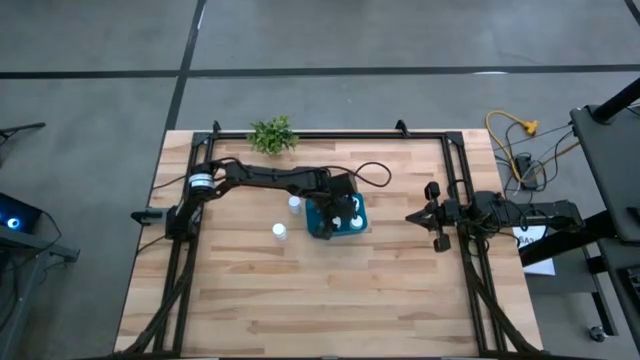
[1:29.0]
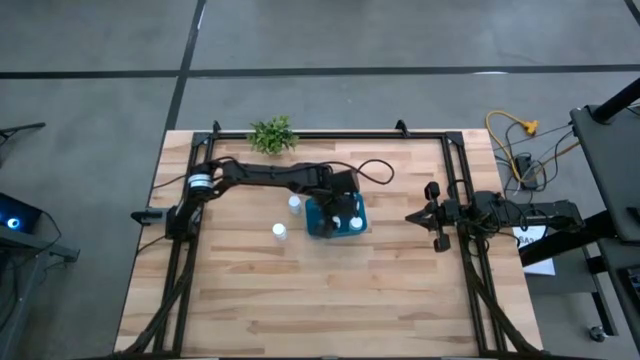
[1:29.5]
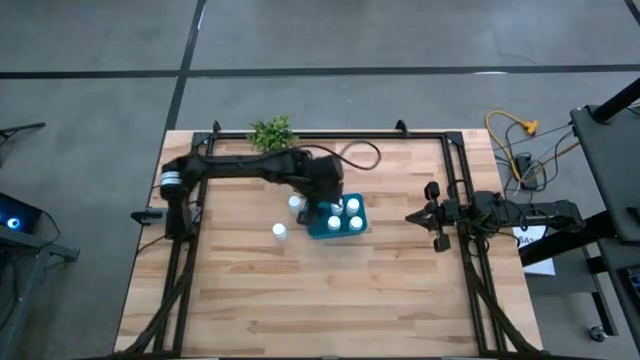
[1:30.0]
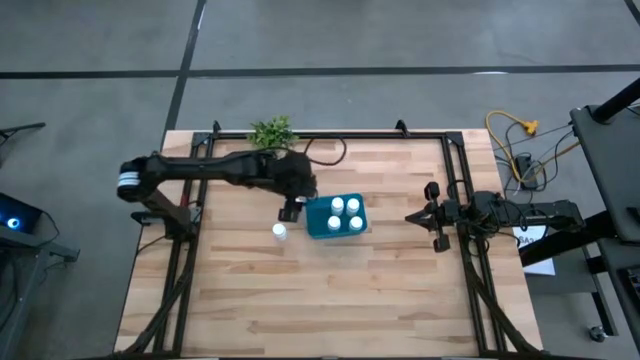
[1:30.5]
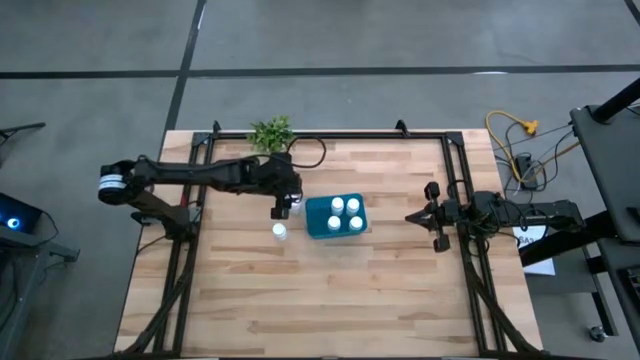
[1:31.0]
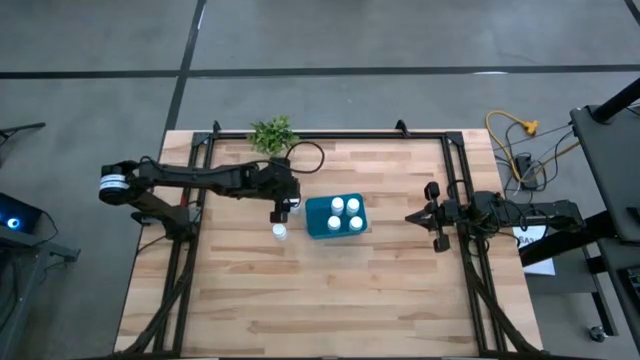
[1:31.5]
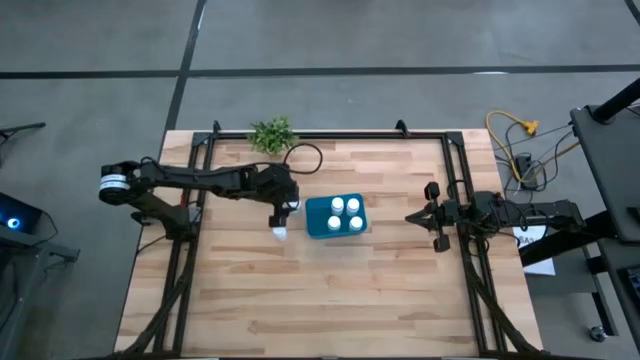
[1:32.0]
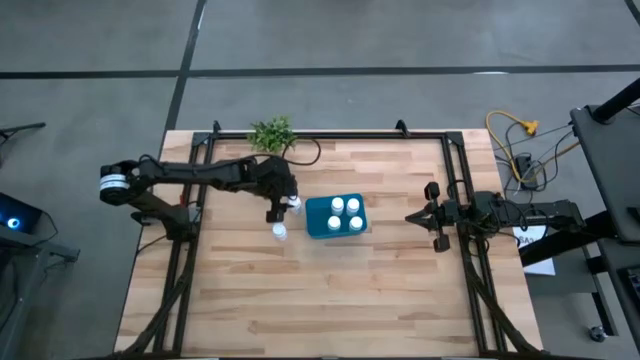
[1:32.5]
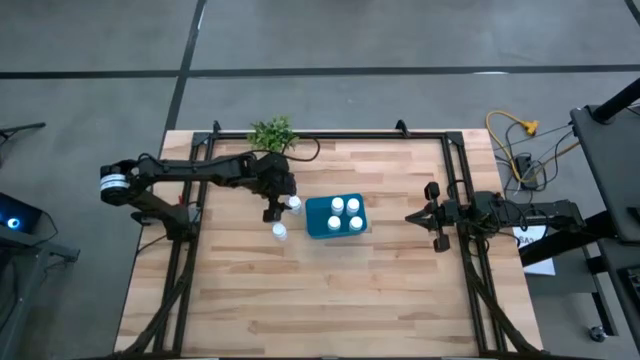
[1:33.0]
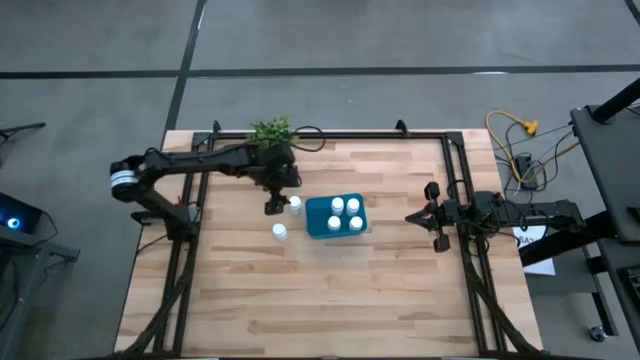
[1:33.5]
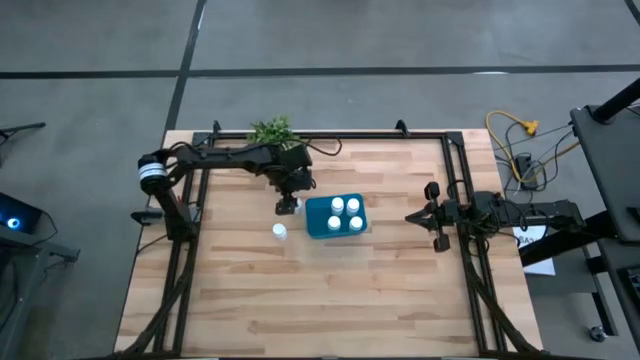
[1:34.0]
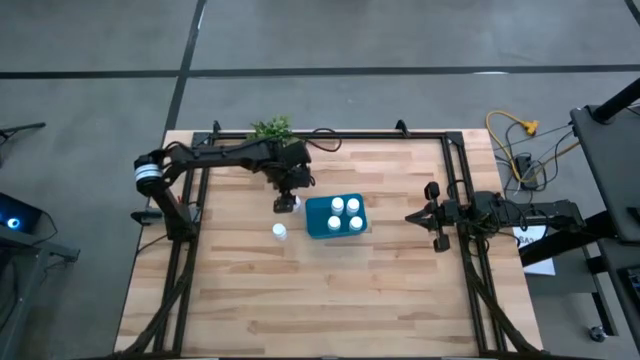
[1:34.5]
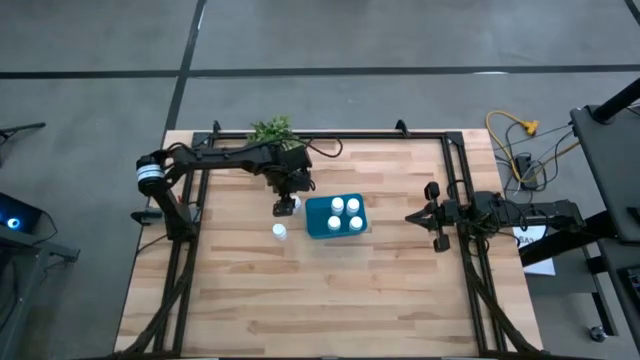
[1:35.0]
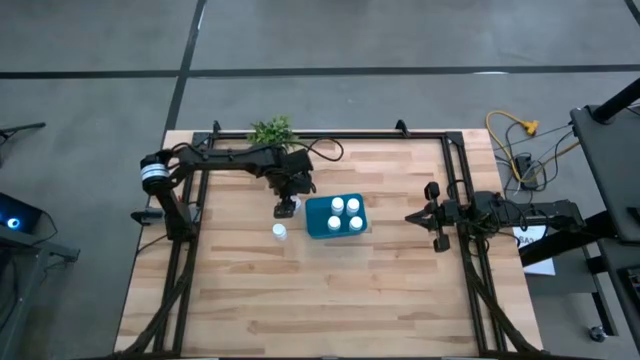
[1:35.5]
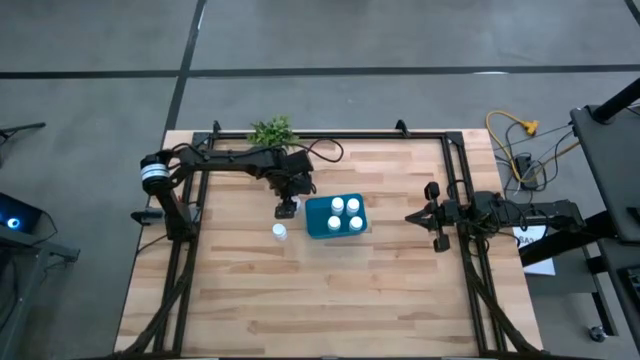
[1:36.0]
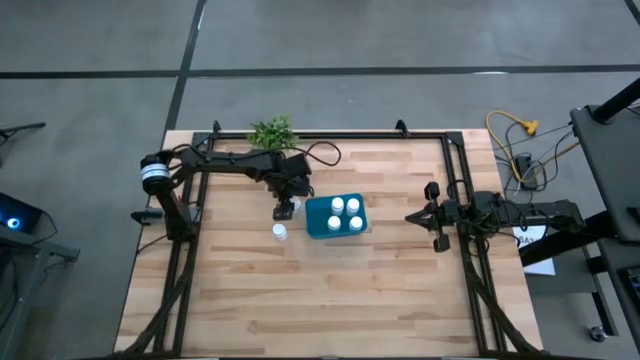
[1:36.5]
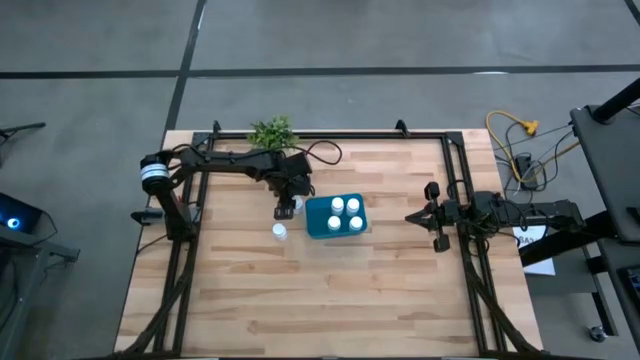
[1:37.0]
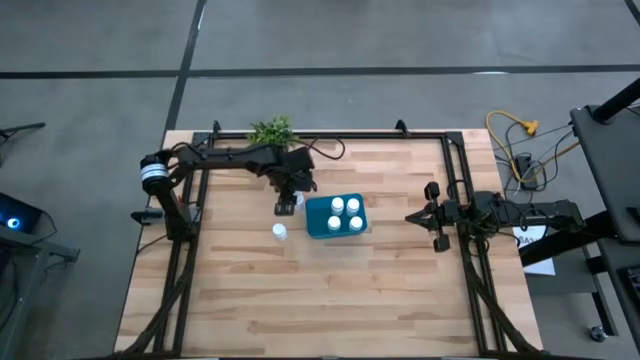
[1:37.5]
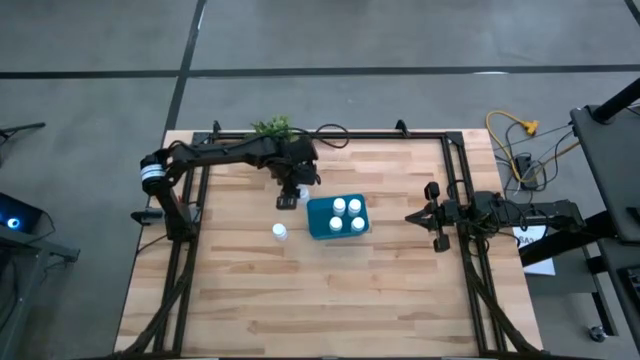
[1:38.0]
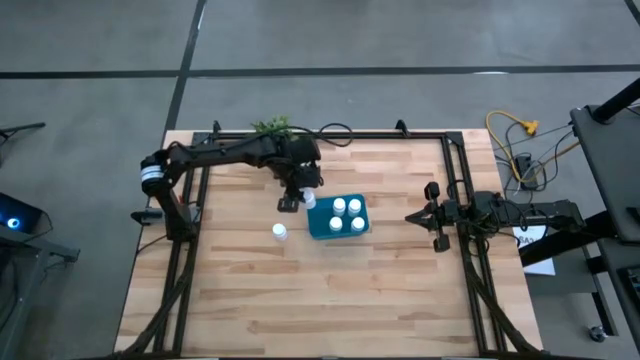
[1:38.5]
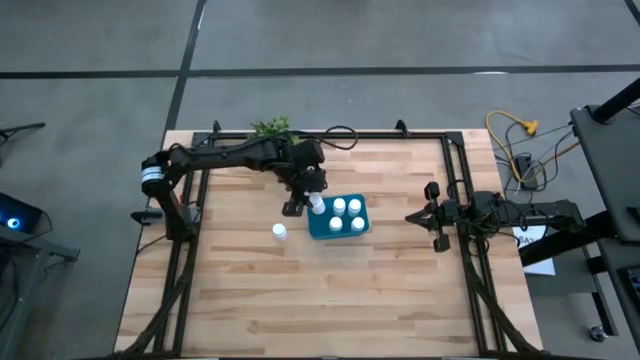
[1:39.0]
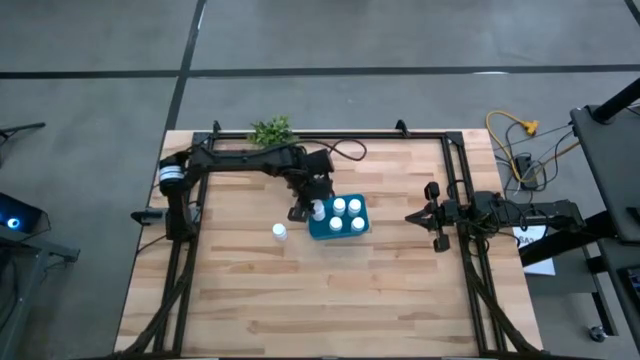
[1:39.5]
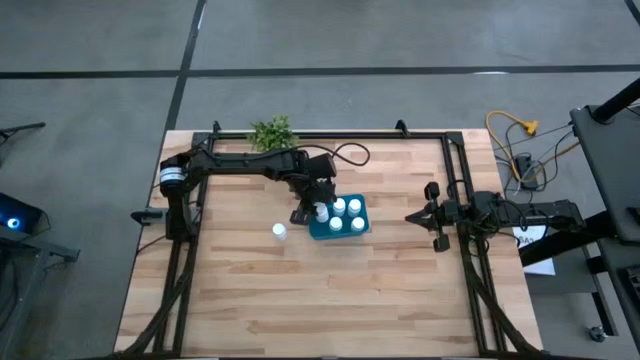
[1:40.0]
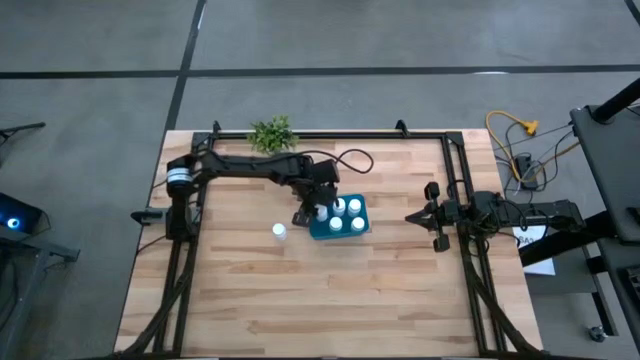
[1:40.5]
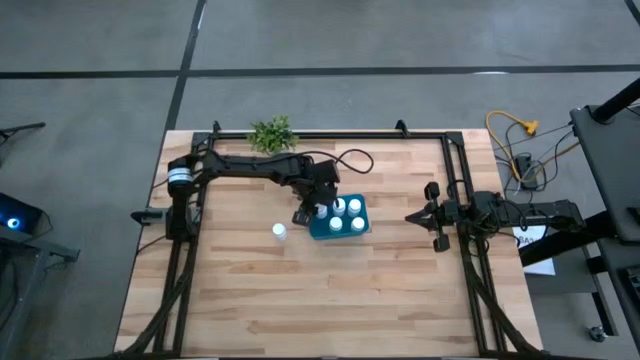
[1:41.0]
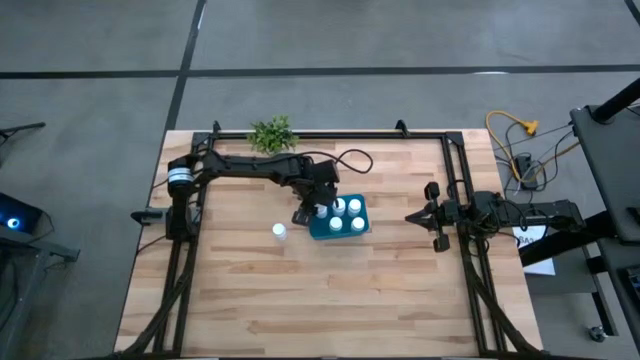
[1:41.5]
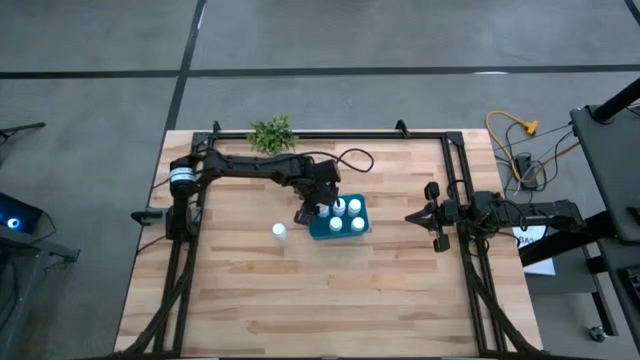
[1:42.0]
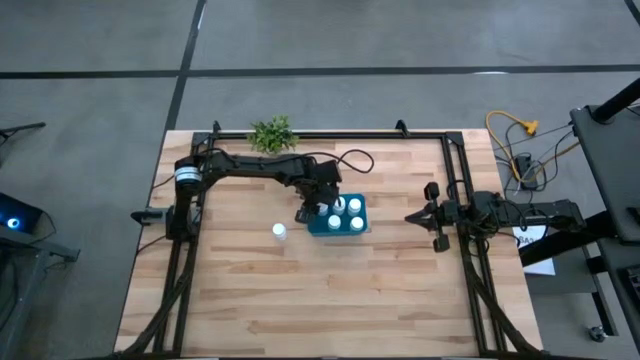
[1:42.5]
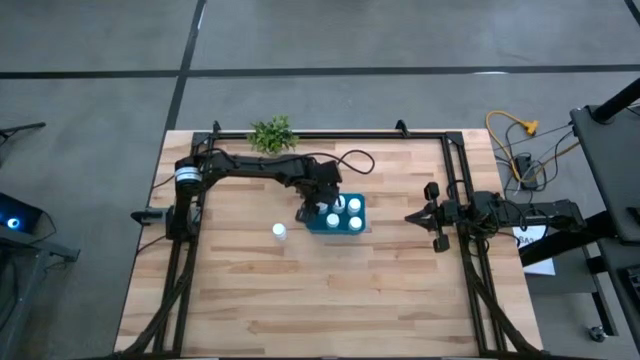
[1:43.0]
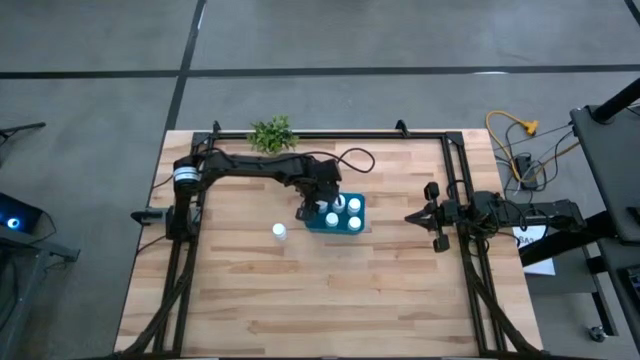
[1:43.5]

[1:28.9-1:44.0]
Task: Pick and place pill bottles into a basket
Put the white medicine bottle into the blue bin

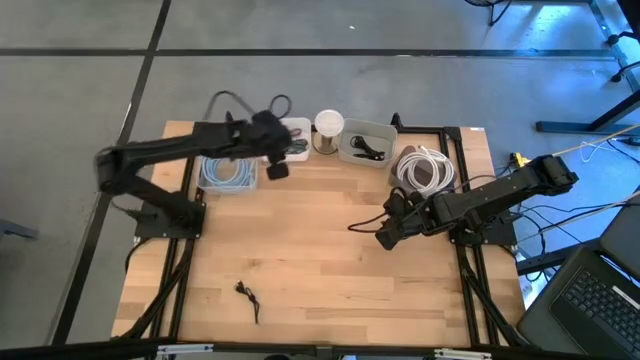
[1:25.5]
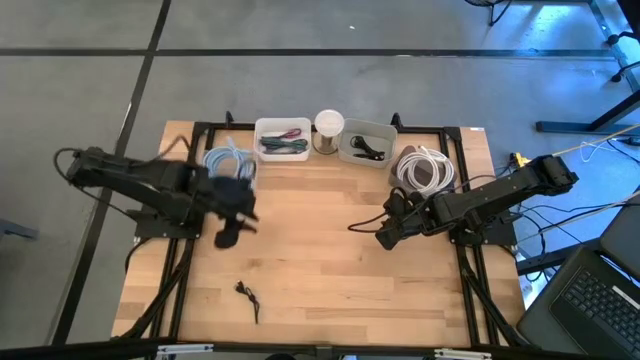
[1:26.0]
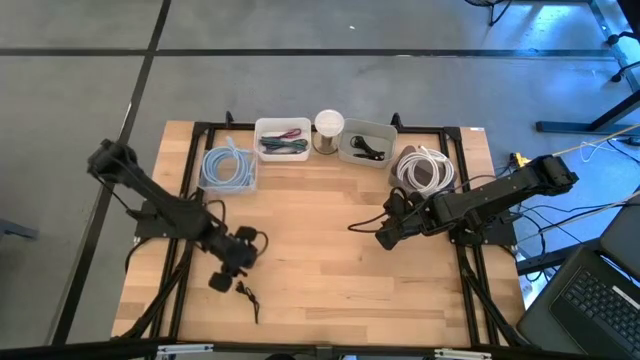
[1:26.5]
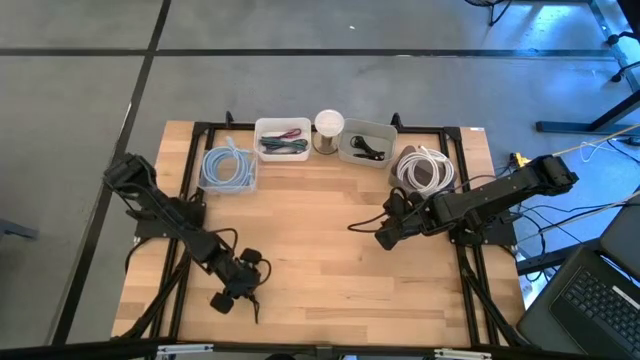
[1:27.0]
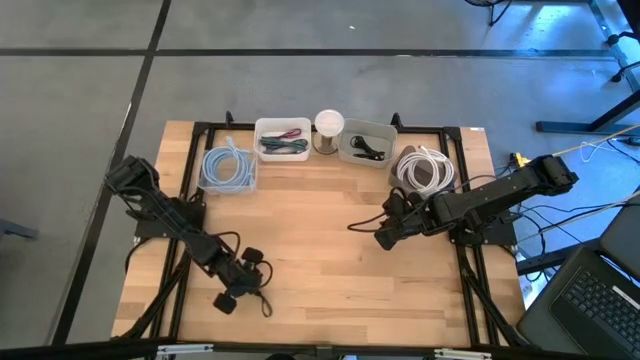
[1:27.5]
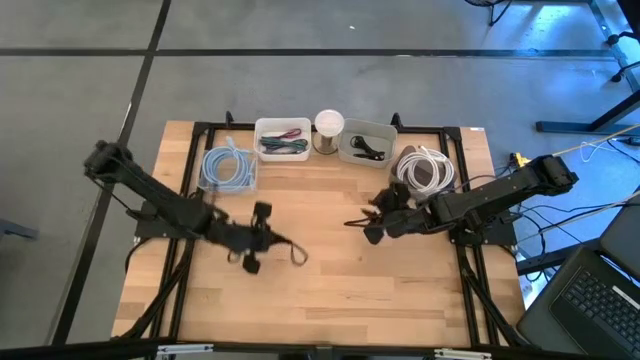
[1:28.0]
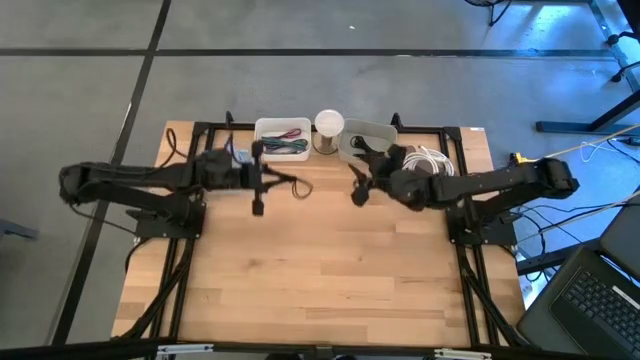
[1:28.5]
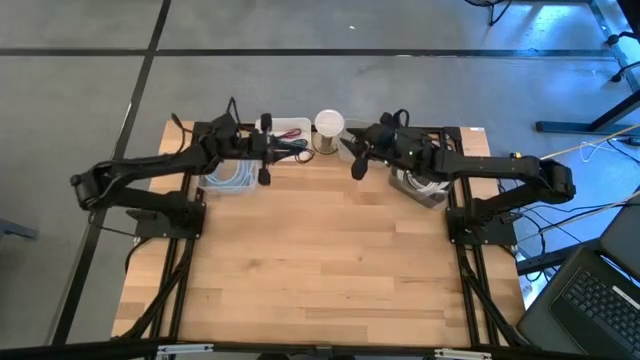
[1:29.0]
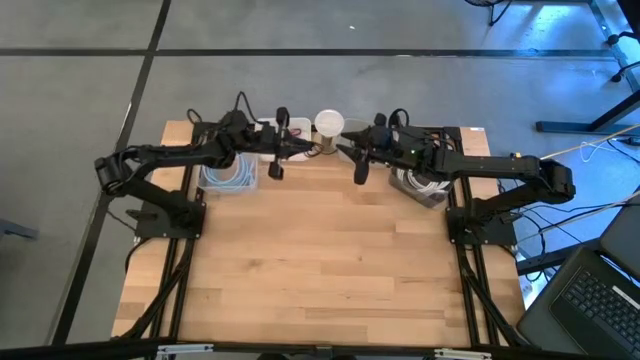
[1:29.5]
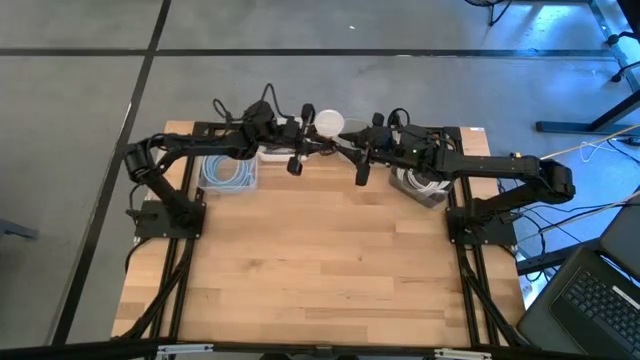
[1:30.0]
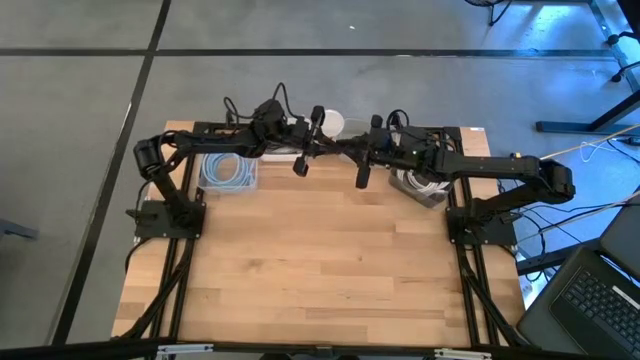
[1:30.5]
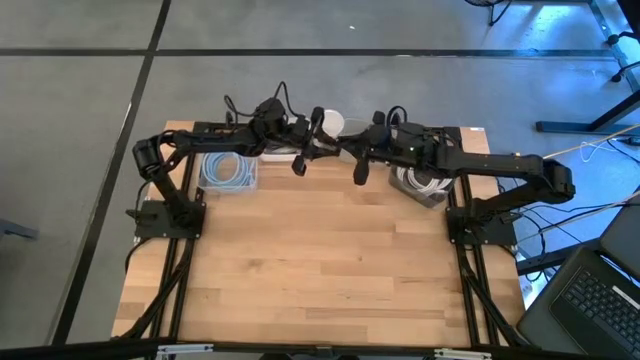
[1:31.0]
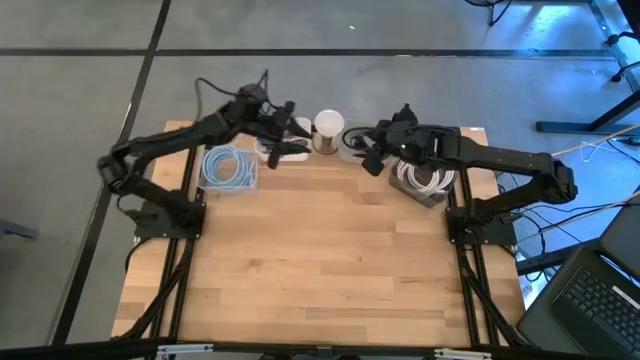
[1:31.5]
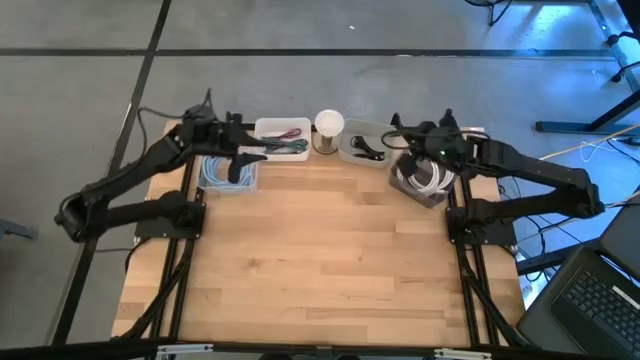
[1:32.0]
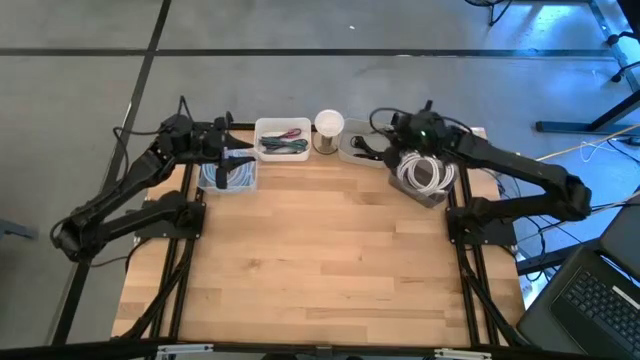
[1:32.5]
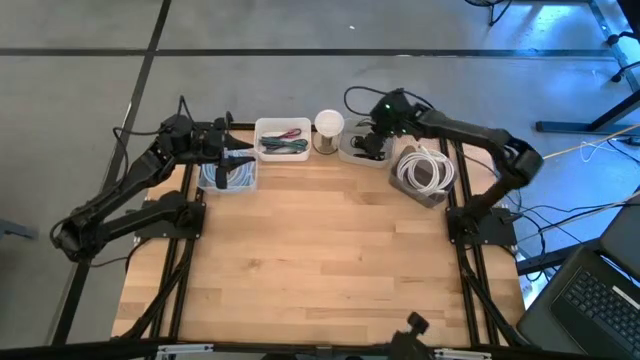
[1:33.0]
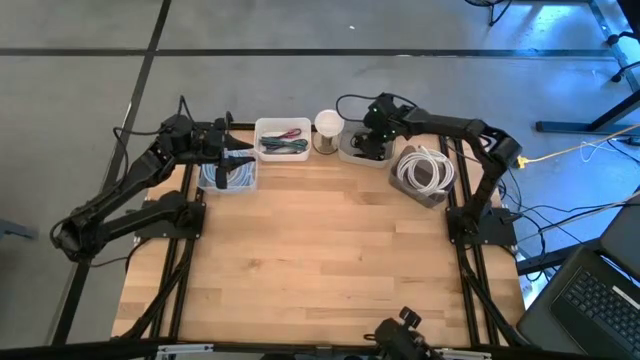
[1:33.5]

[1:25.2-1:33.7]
Task: Pick & Place USB Port
Put the black USB cable into the gray bin
